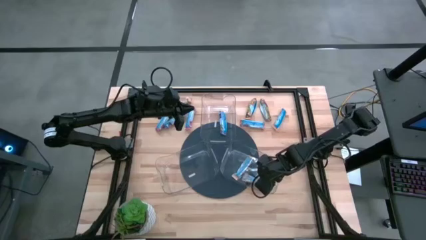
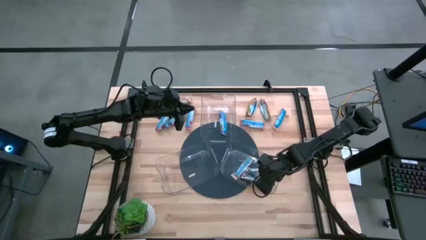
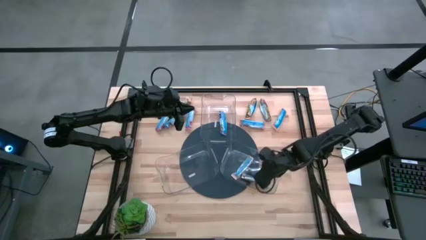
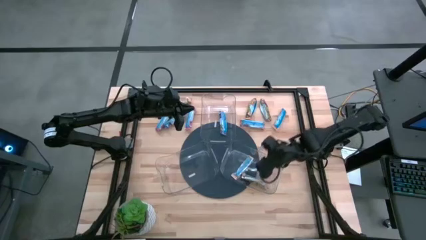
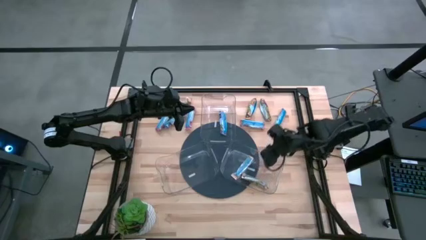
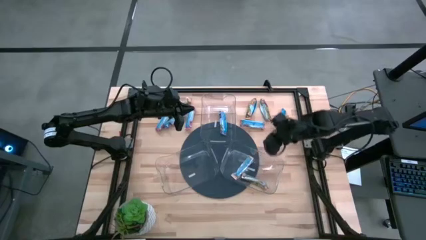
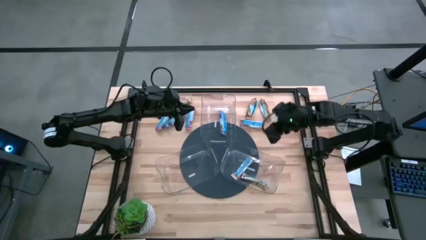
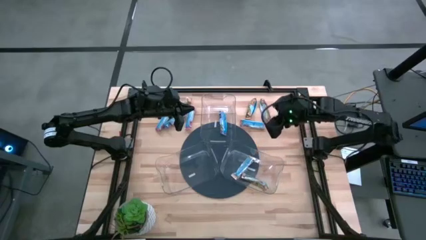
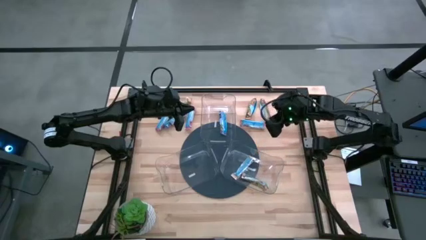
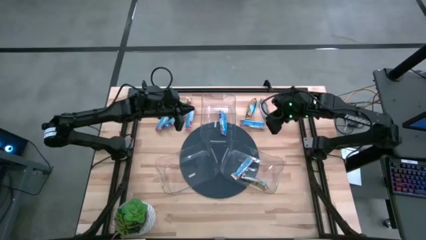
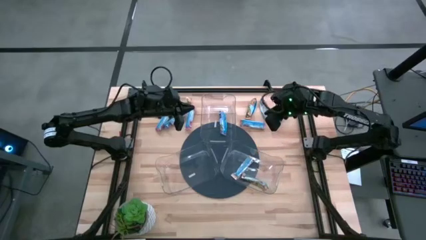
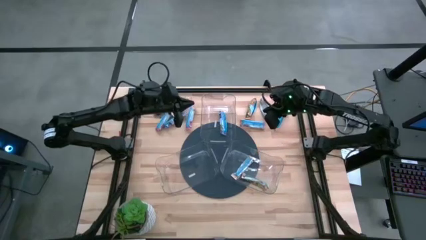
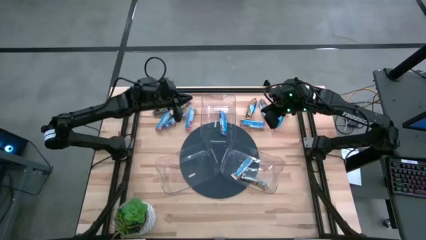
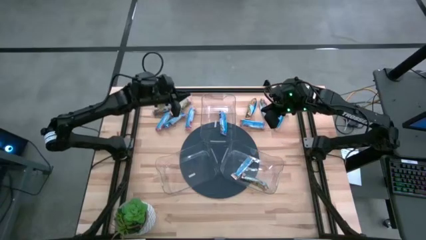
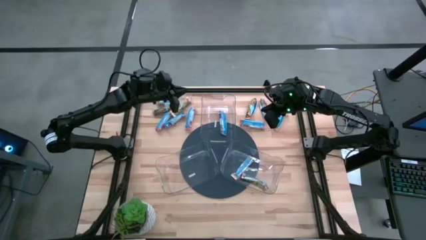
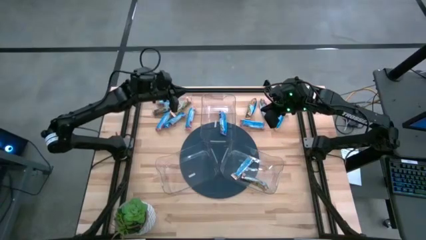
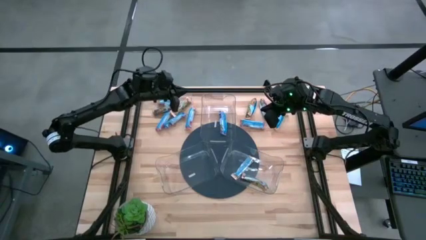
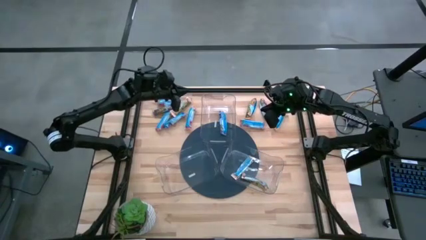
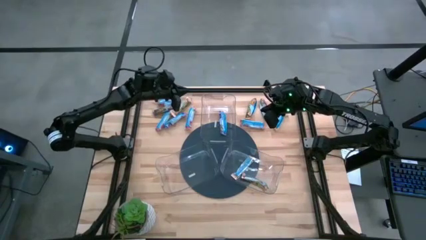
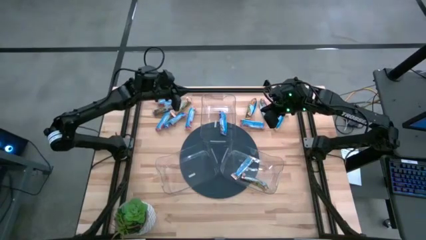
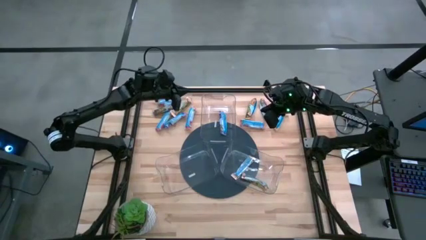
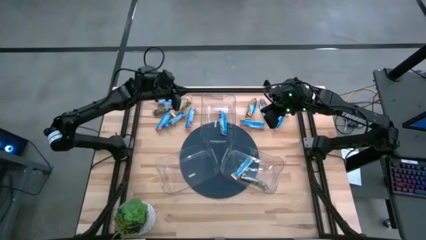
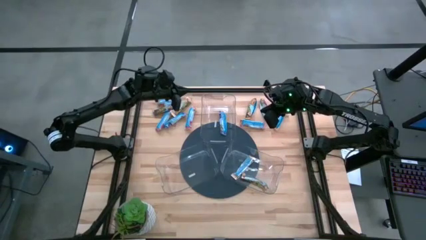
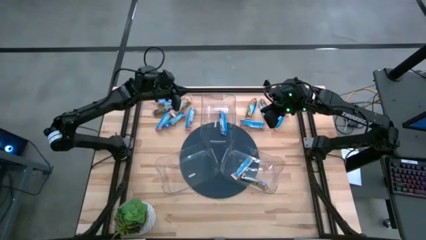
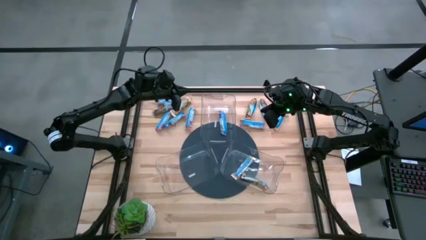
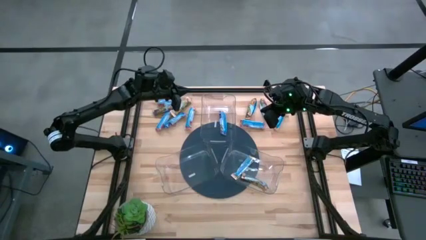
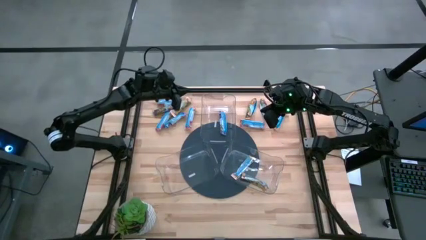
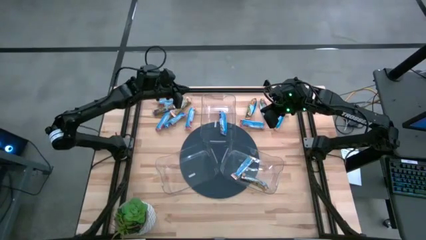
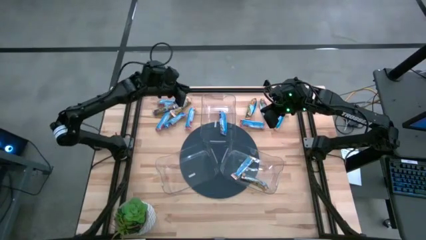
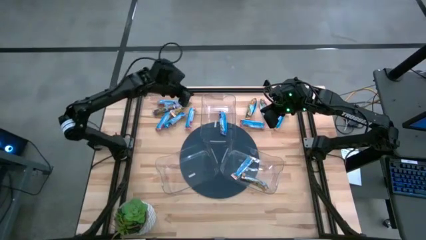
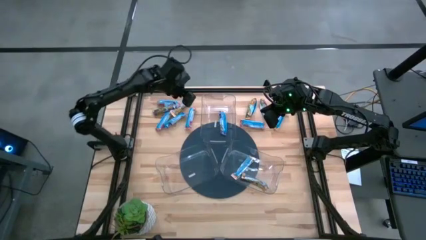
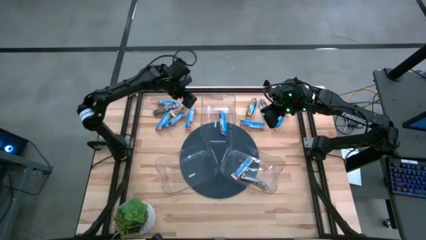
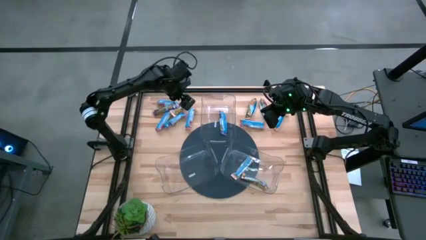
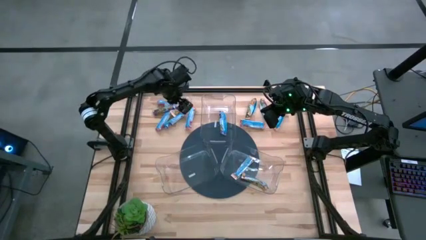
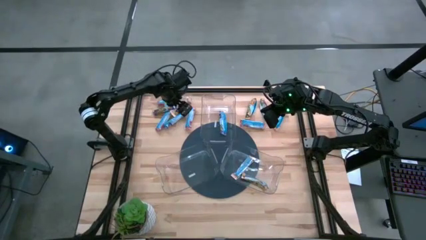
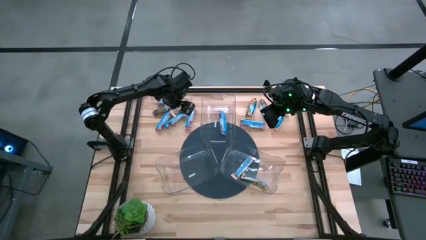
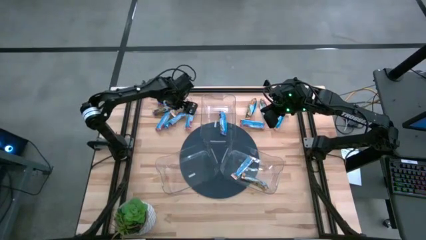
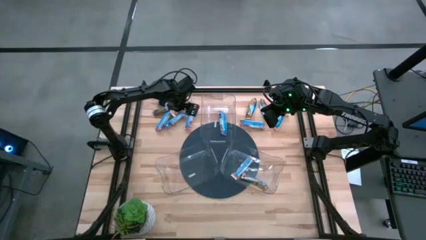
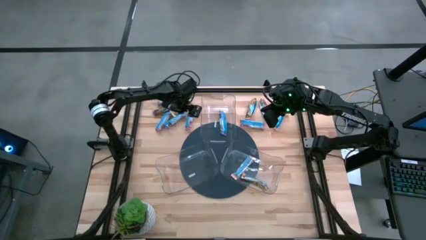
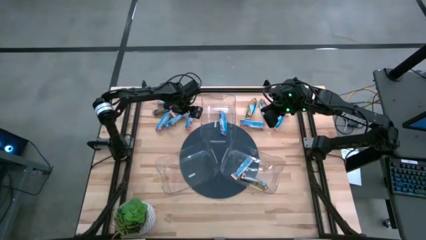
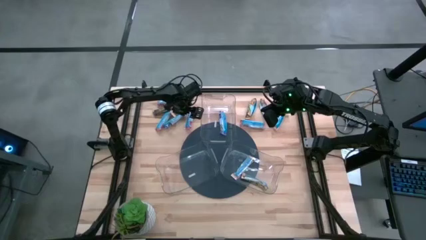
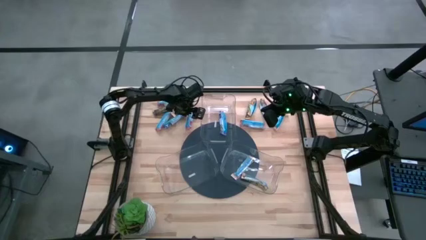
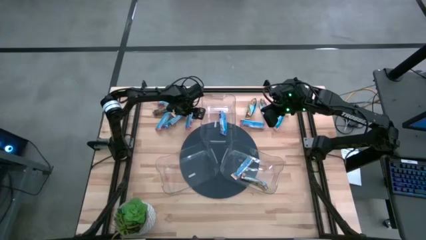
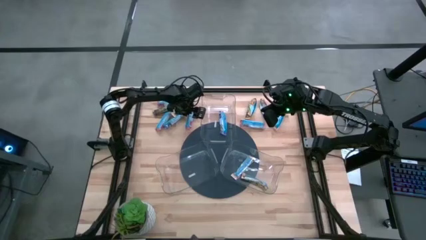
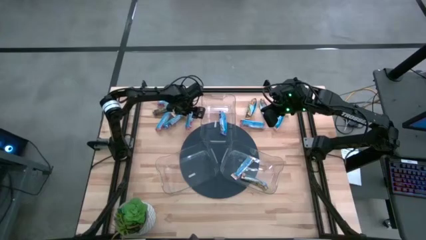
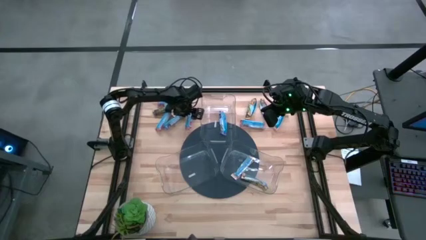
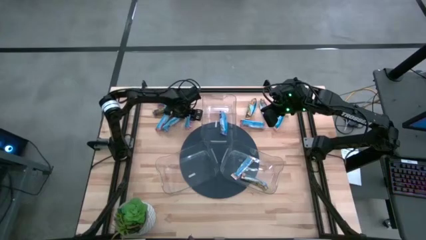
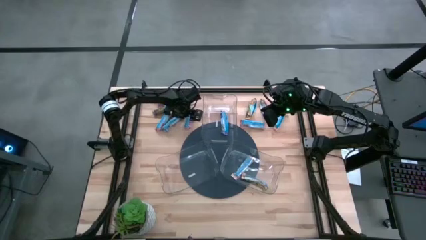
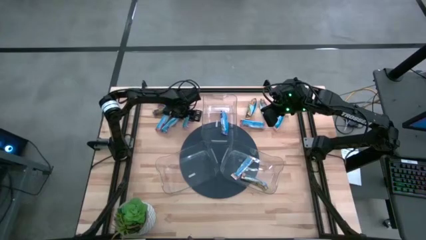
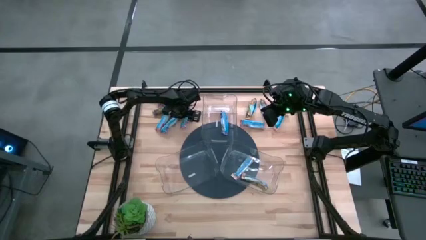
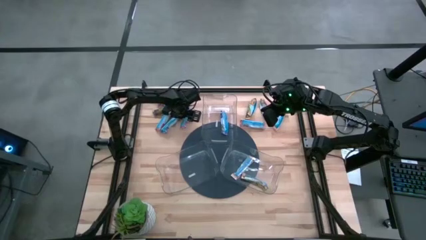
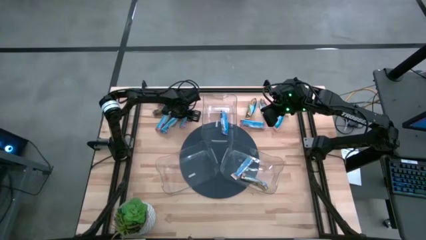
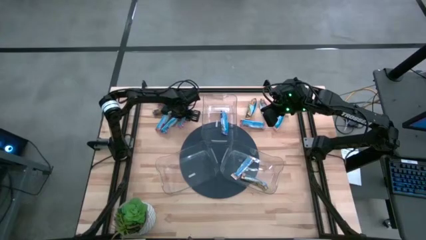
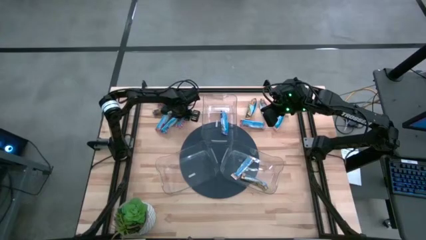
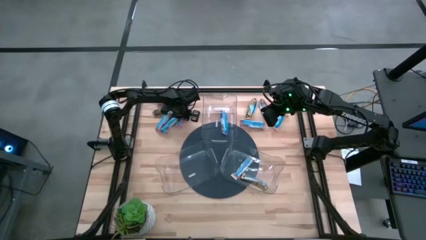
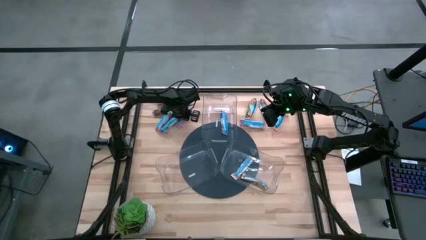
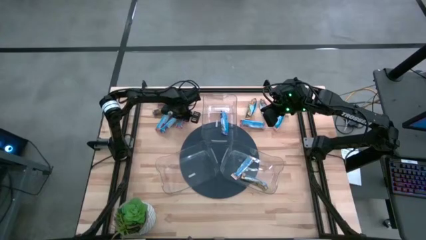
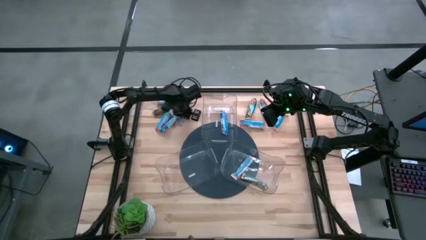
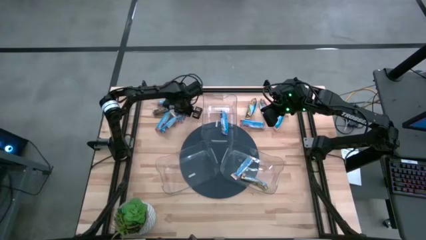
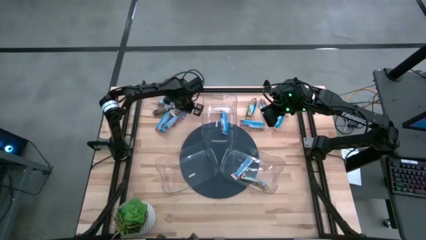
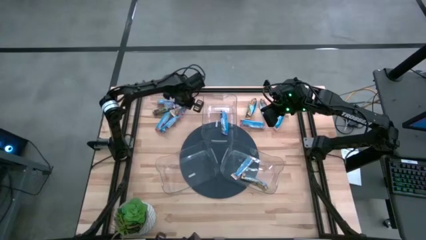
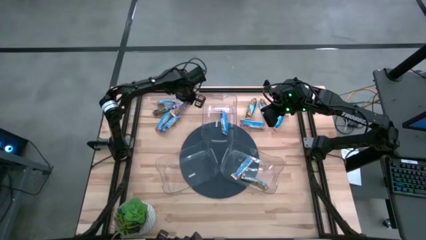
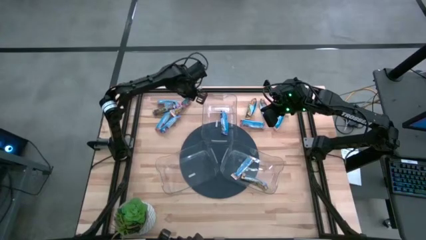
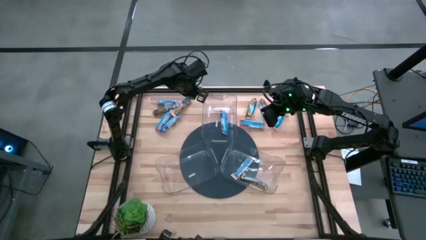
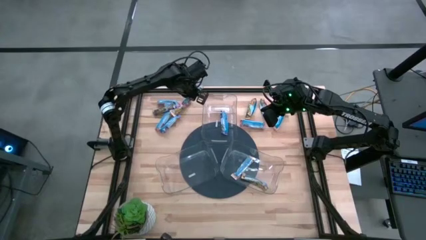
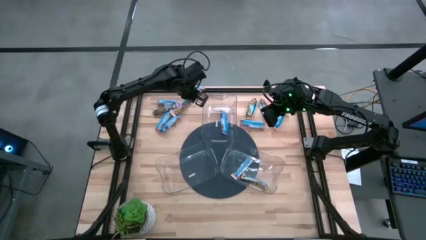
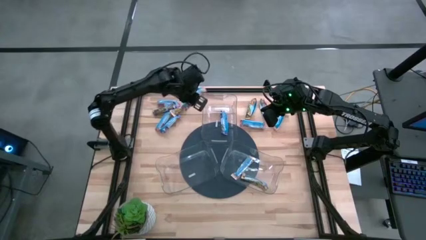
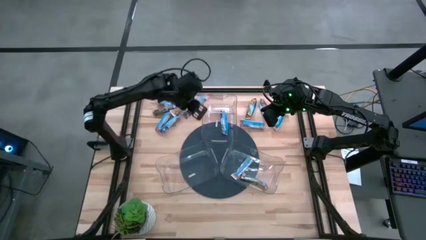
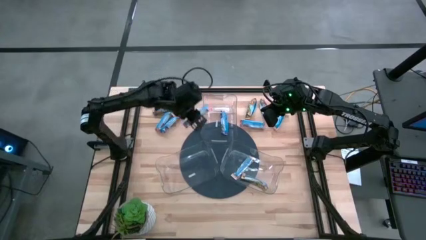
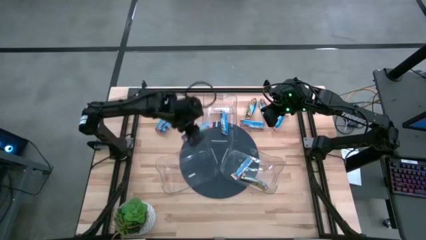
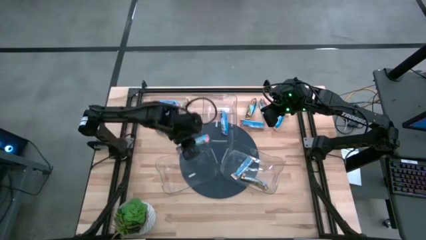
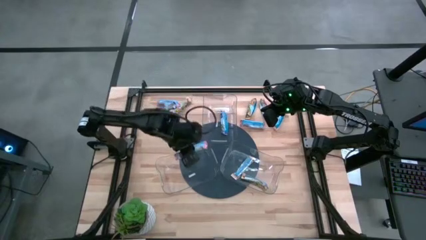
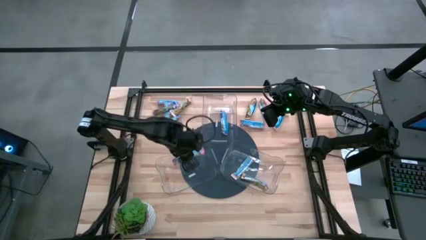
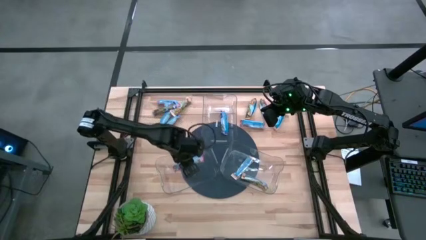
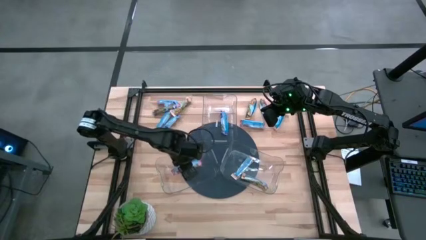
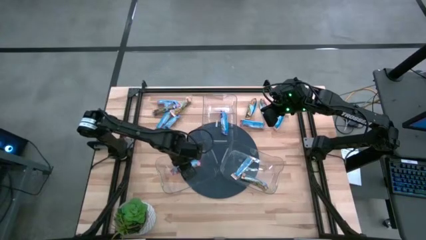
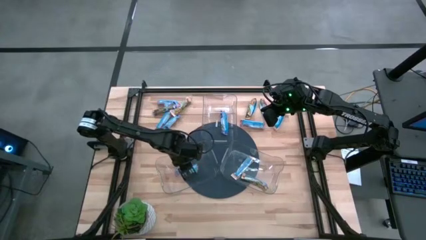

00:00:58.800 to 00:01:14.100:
Task: Pick and place Granola Bars by type
Put the red snack into the left transparent bin

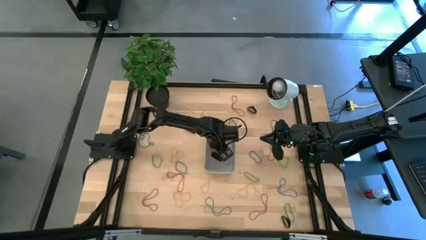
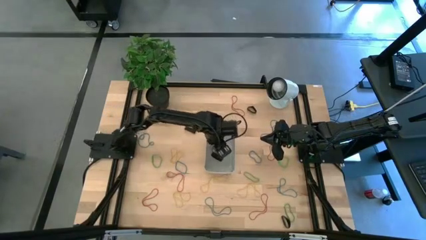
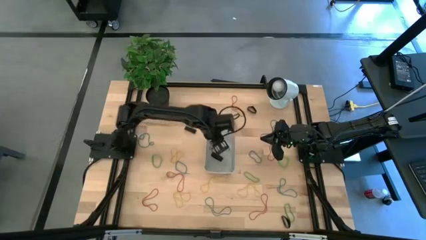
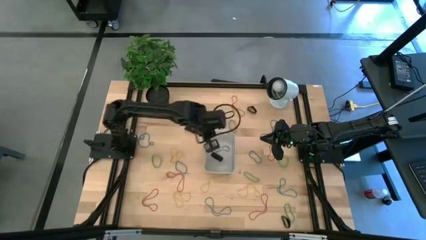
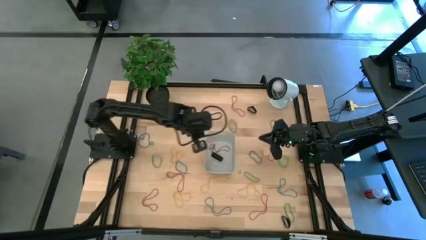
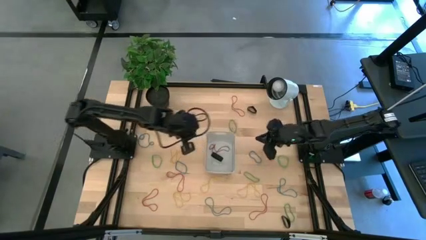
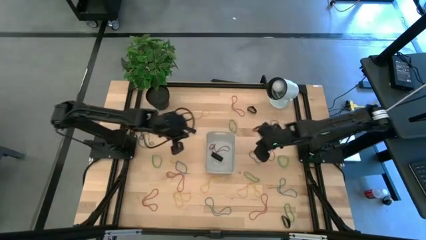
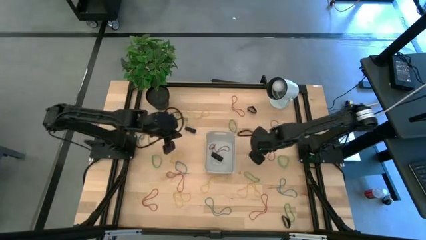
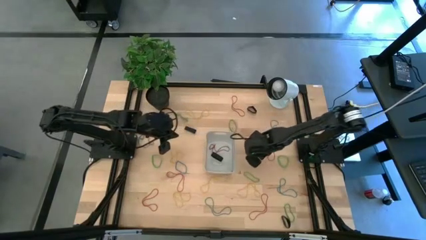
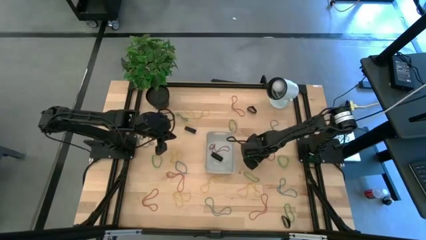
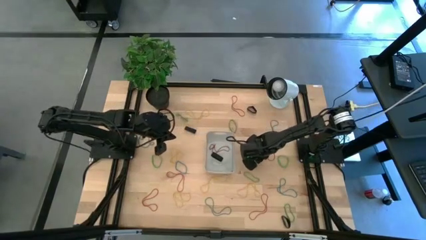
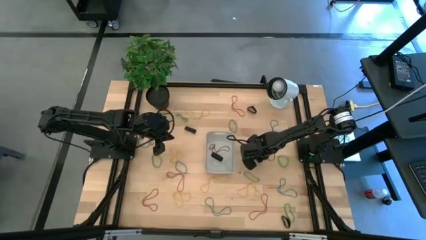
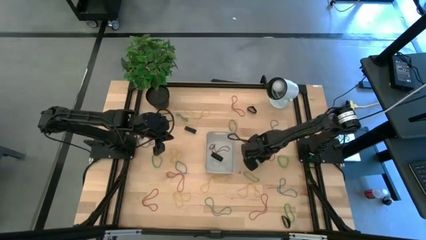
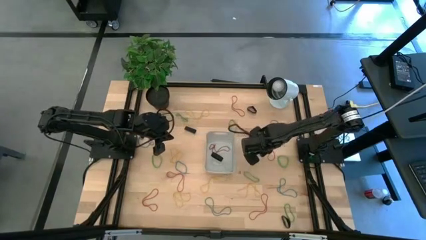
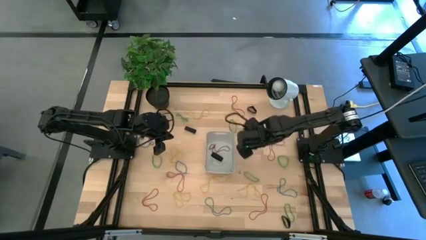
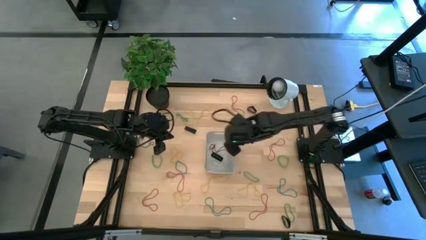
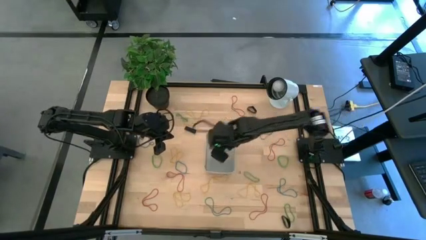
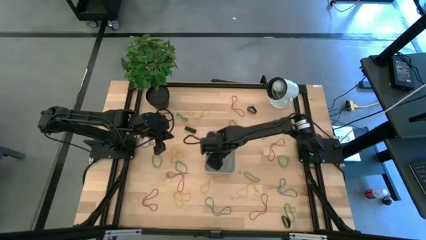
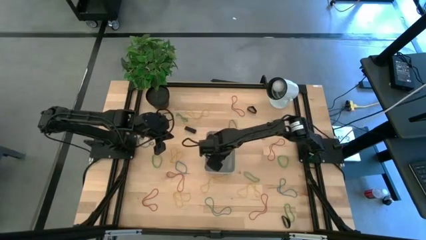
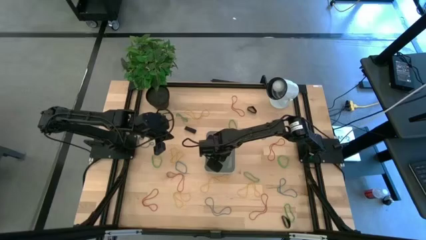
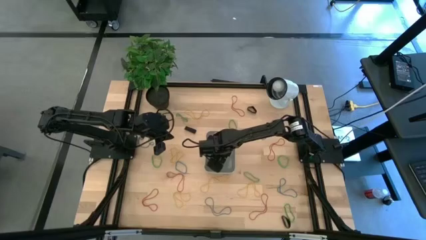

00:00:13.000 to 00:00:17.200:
Task: Pick and place rubber bands into bin
Put the blue rubber band into the gray bin
